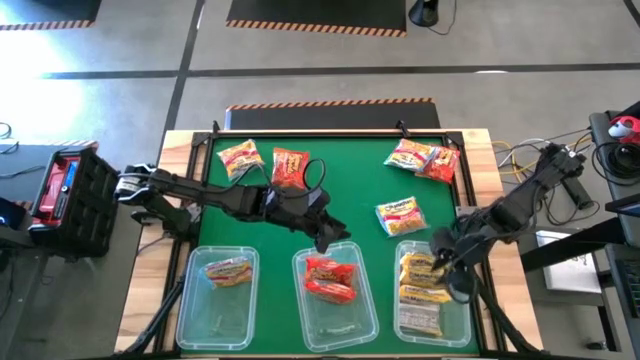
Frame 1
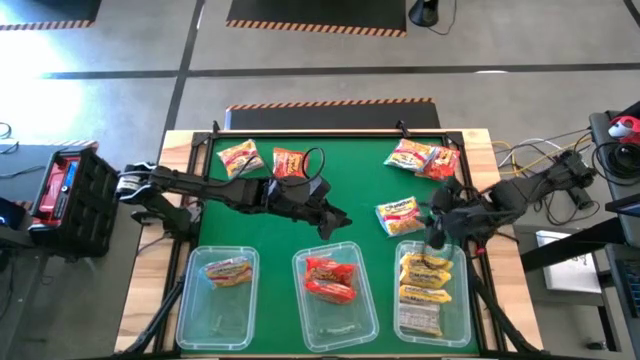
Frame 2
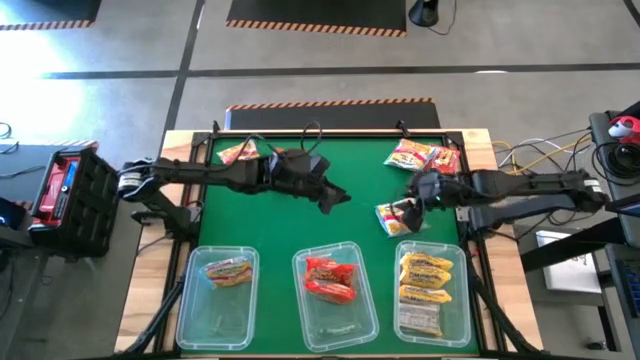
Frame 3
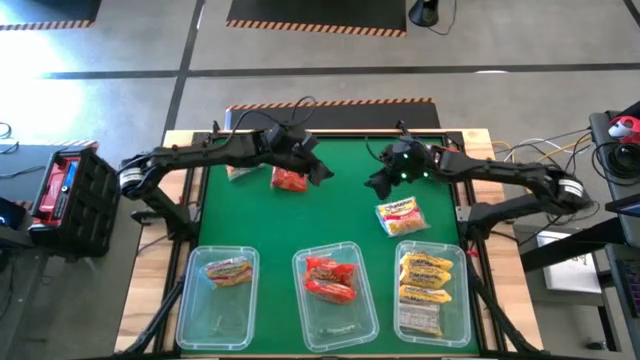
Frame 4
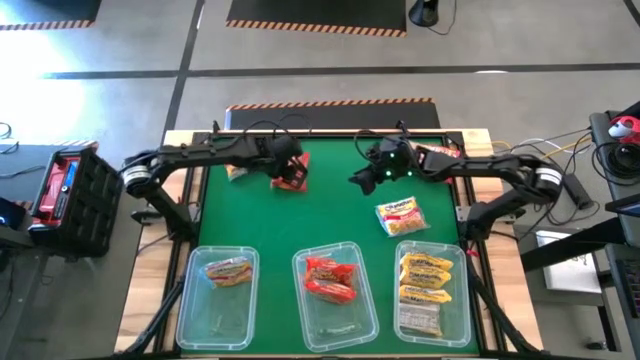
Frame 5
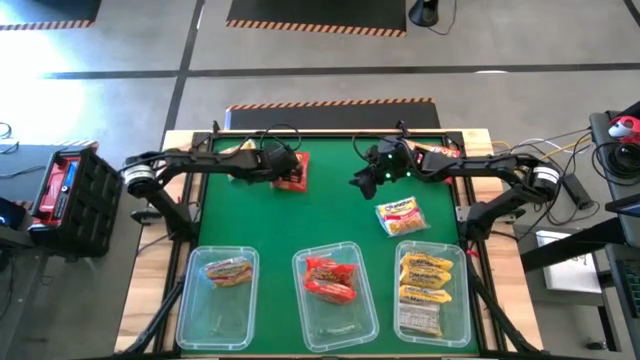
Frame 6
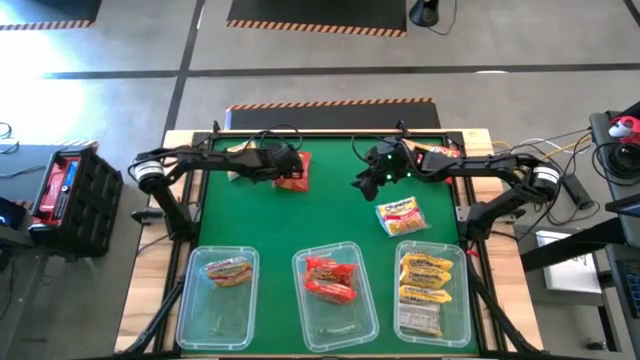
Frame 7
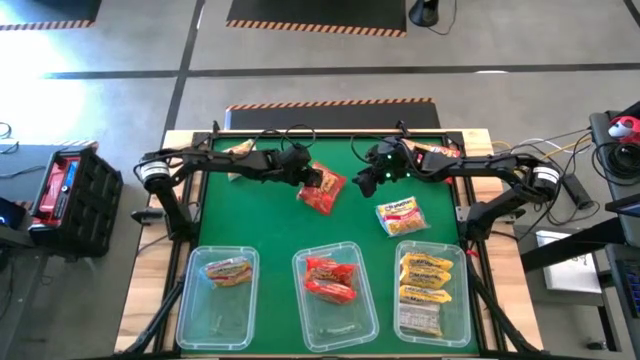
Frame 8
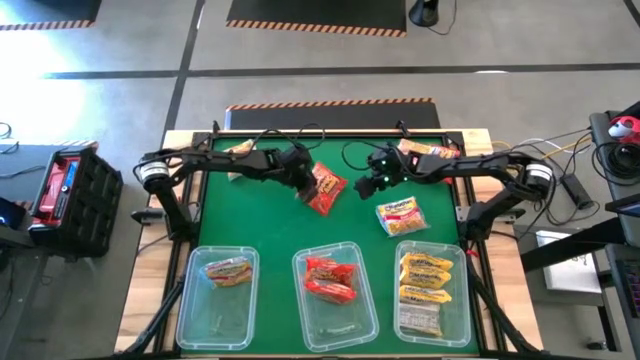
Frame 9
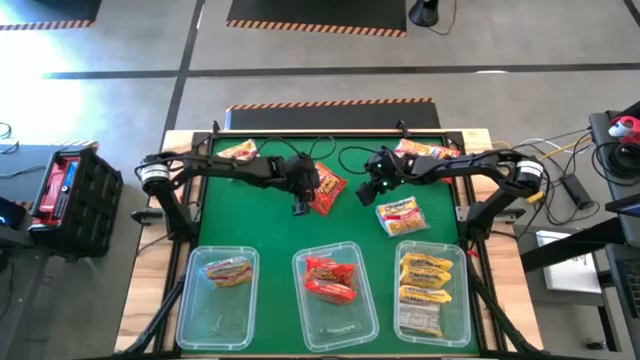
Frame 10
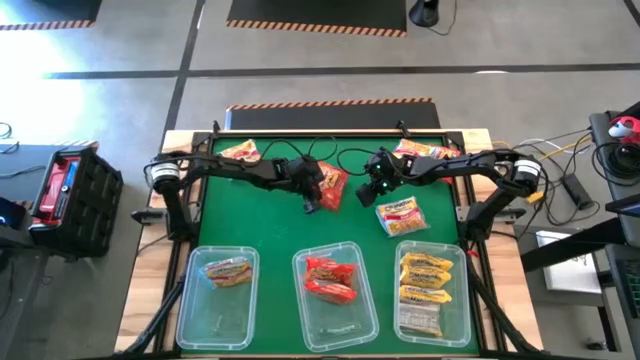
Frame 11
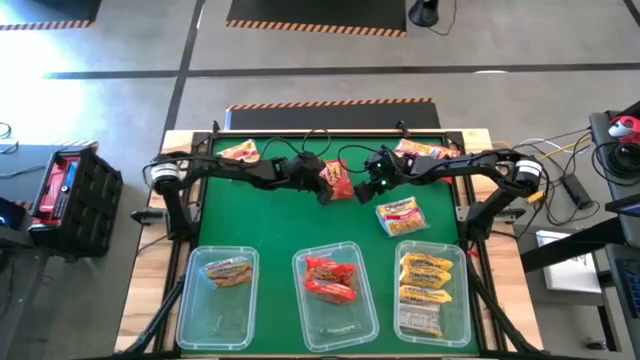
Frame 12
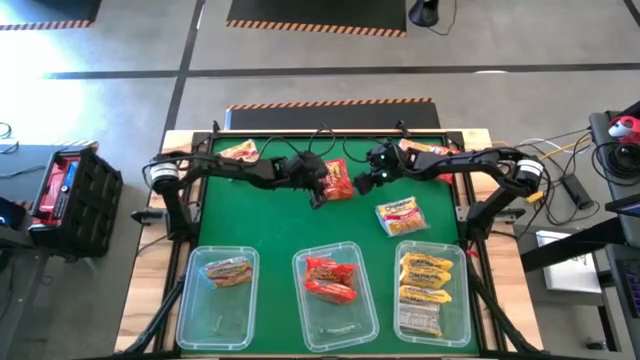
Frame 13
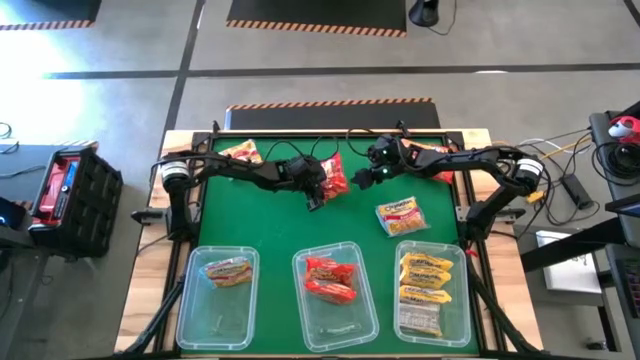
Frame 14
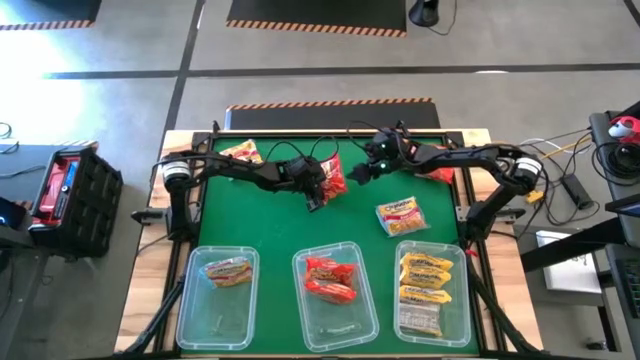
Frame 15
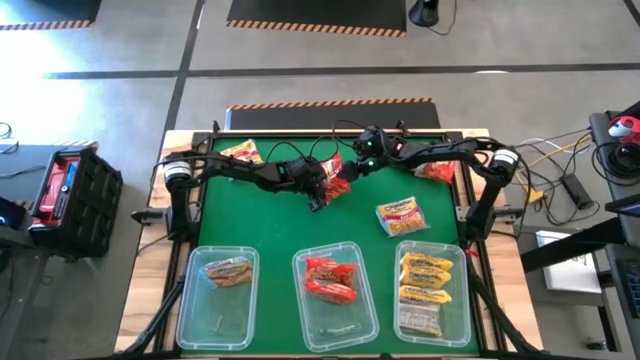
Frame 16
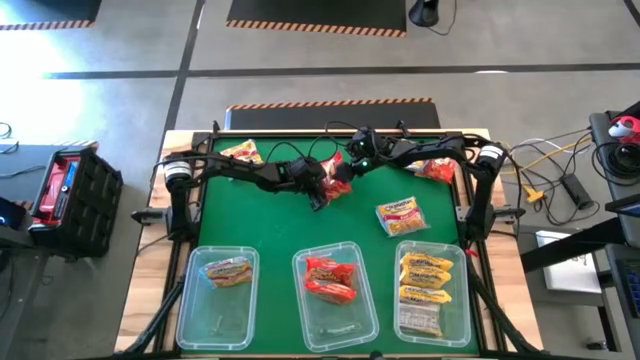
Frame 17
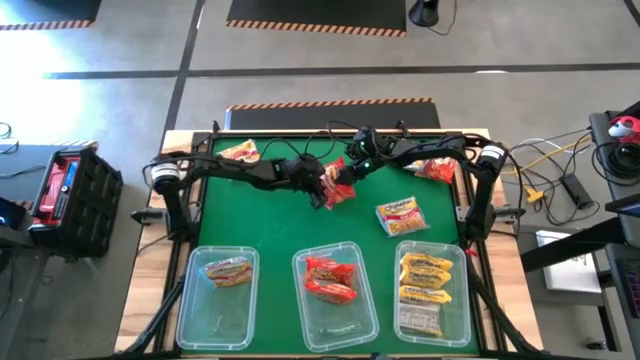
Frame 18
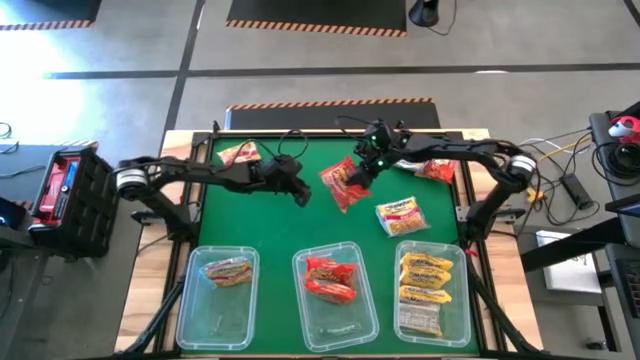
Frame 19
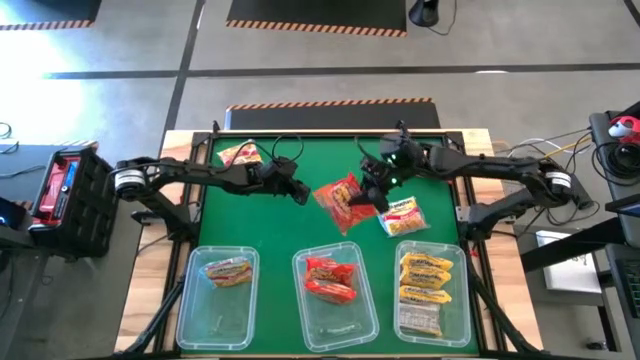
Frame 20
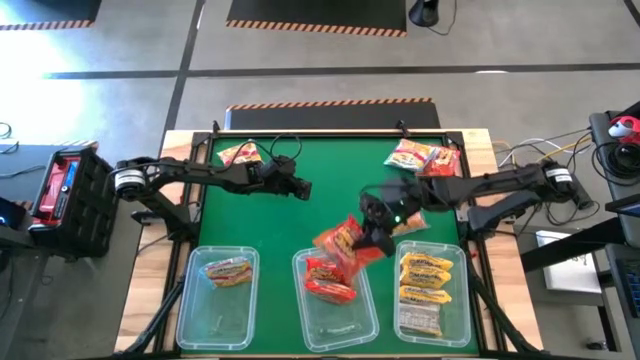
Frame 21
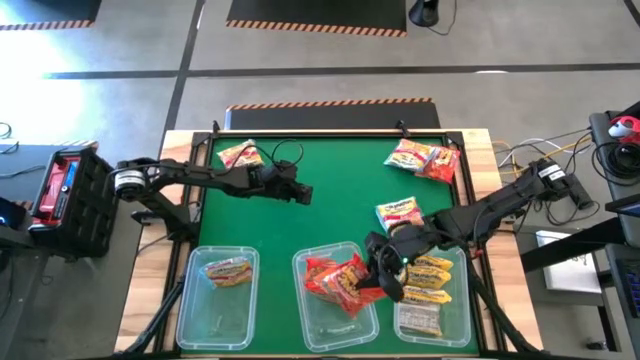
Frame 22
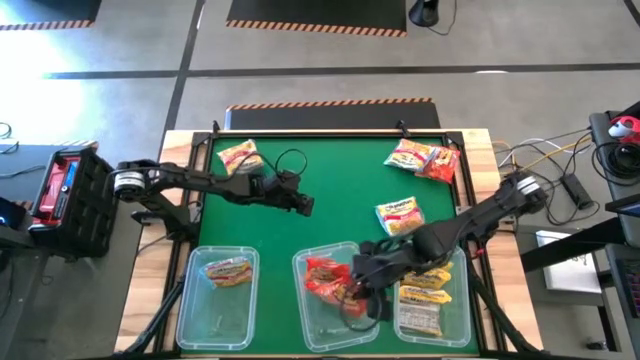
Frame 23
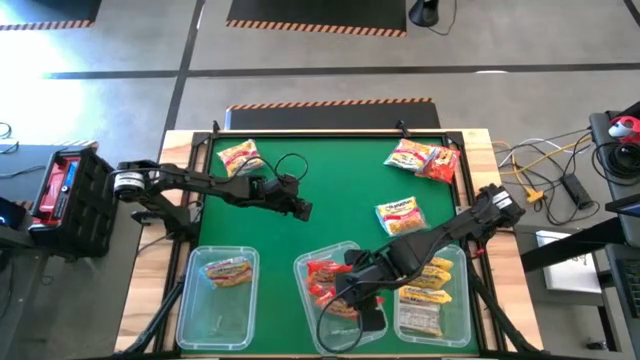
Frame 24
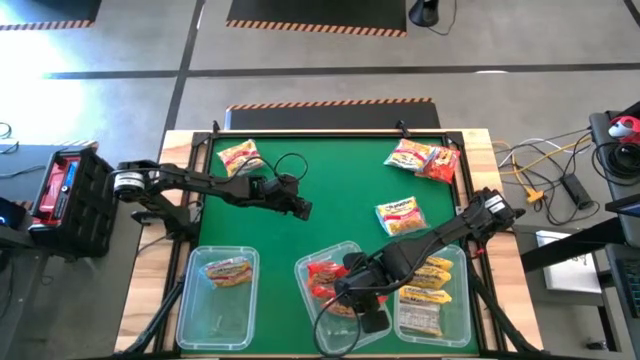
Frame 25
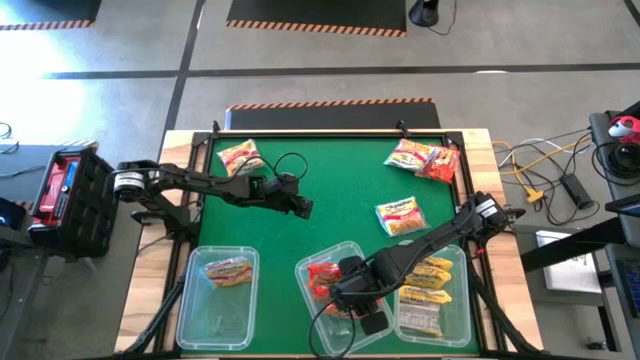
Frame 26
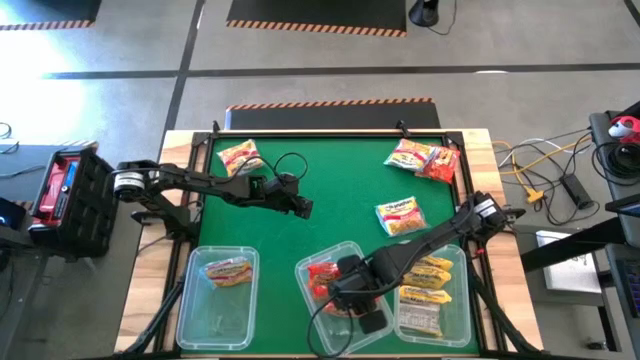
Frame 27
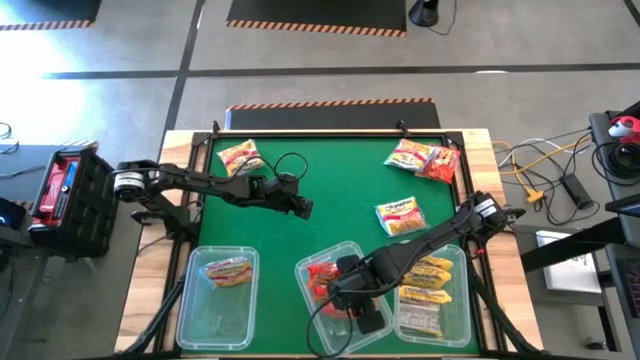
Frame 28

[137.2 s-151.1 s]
Task: Sort Maruchan noodles
Put the orange noodle pack into the middle transparent bin

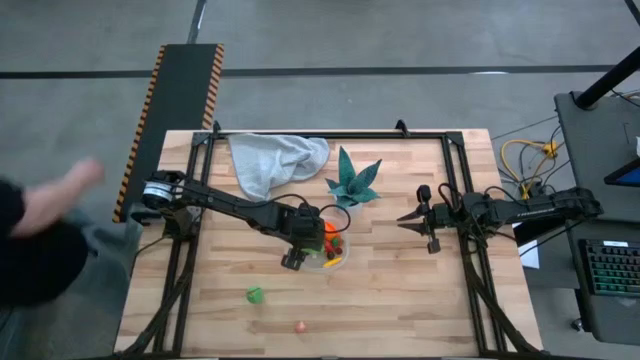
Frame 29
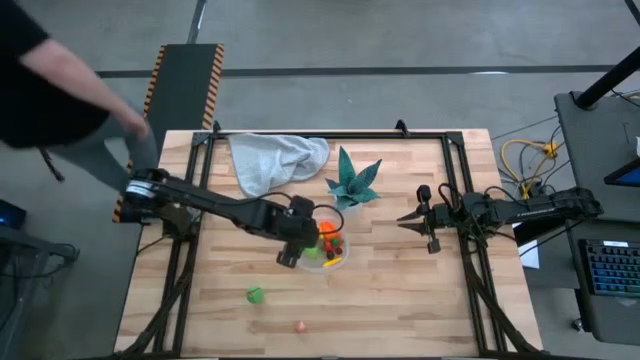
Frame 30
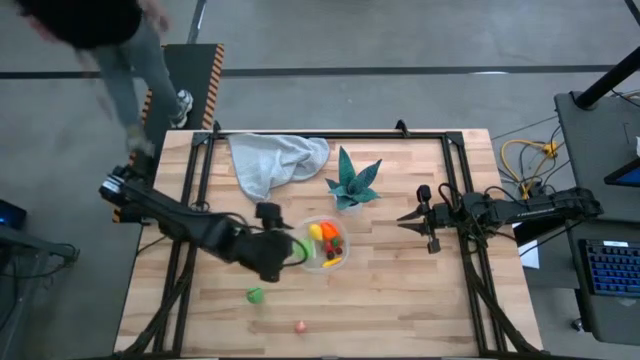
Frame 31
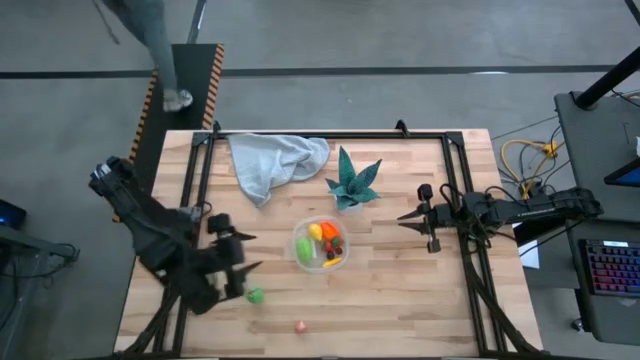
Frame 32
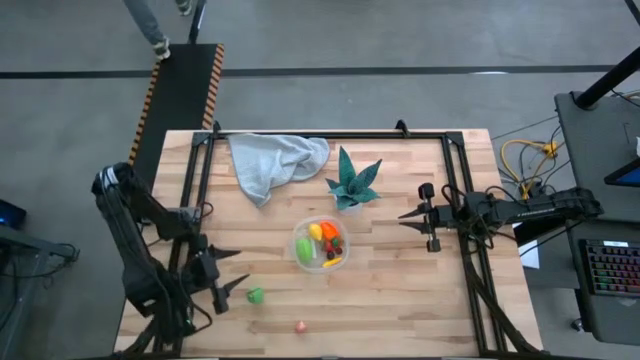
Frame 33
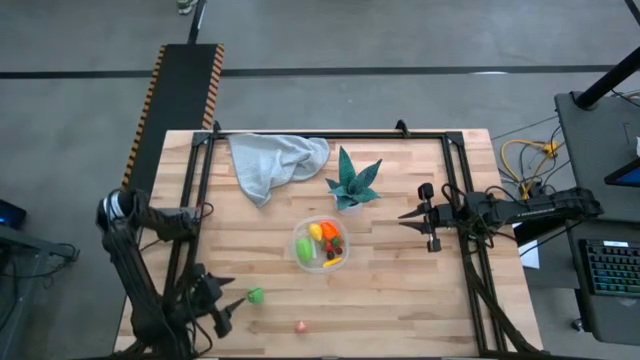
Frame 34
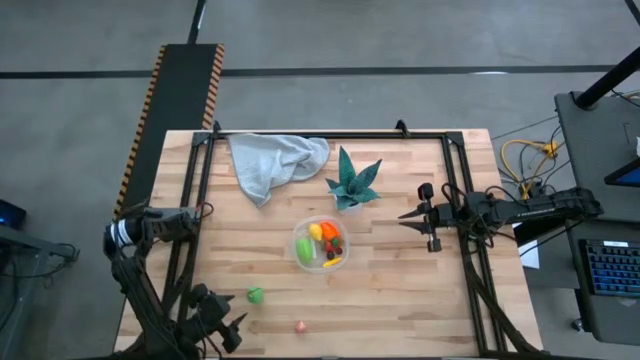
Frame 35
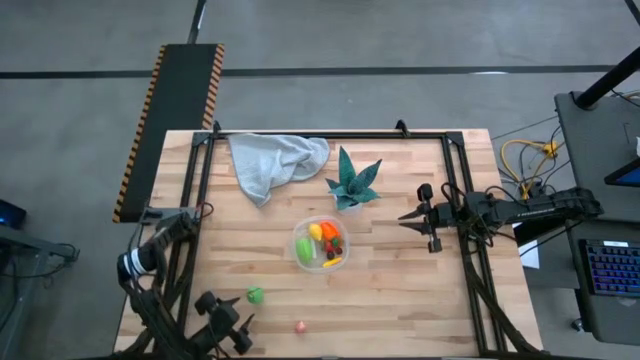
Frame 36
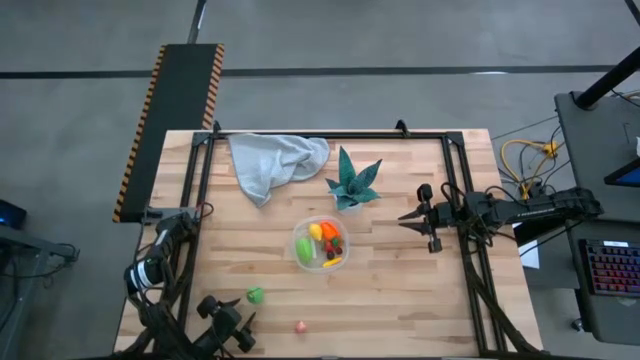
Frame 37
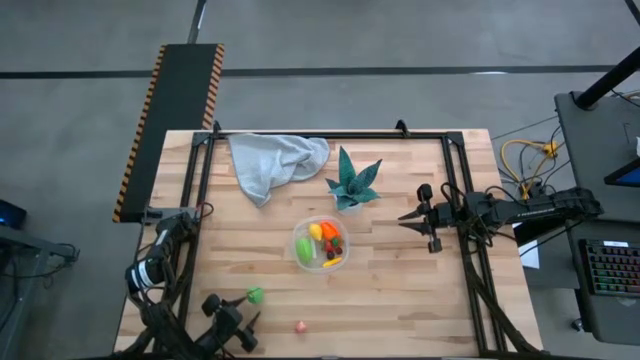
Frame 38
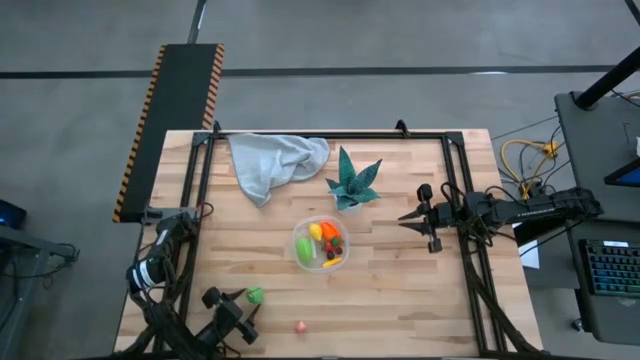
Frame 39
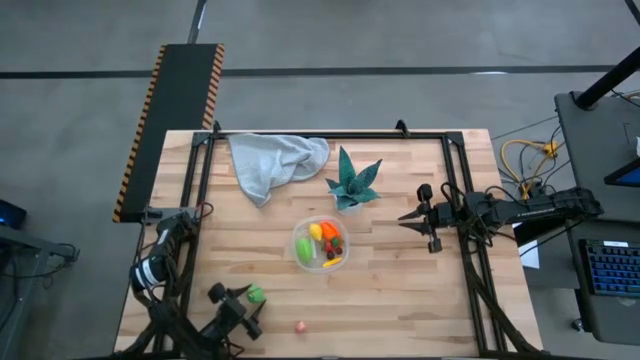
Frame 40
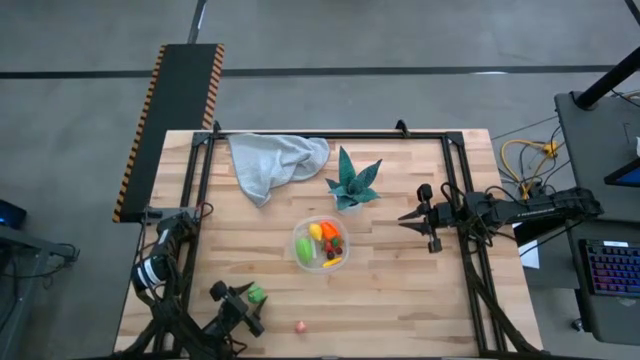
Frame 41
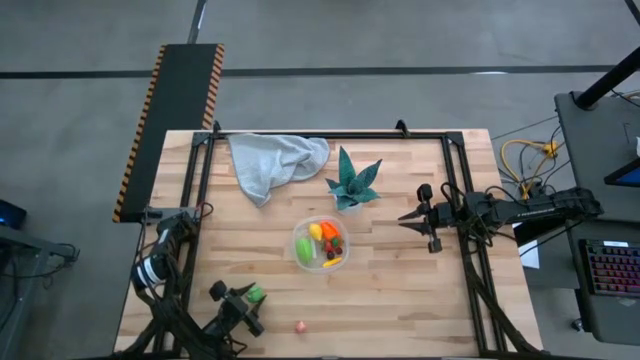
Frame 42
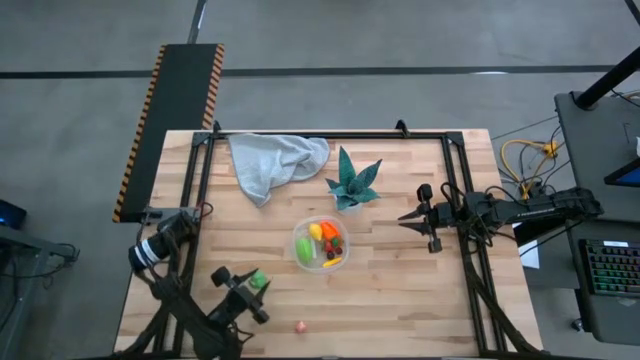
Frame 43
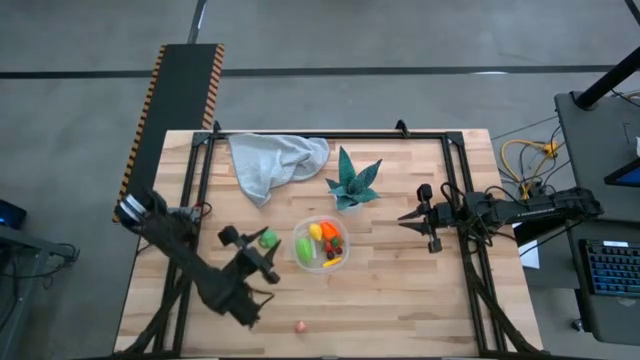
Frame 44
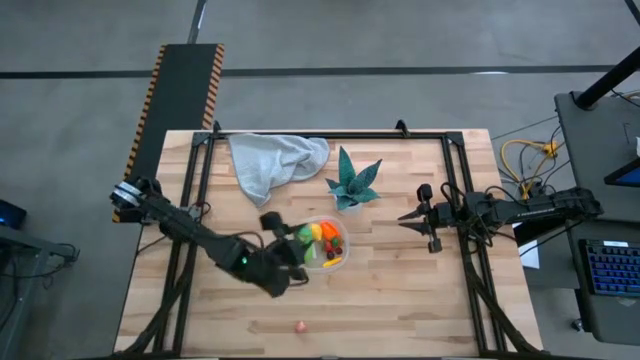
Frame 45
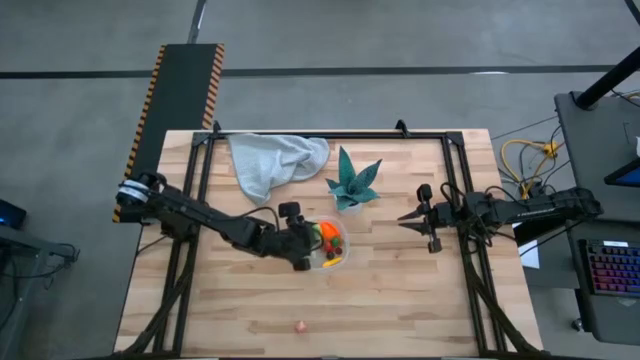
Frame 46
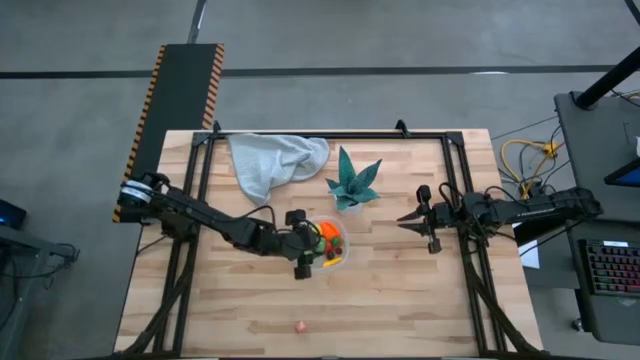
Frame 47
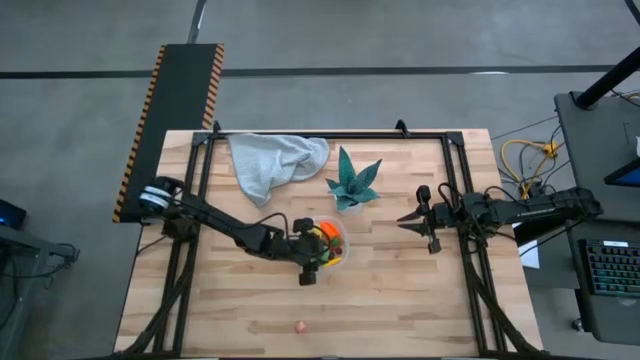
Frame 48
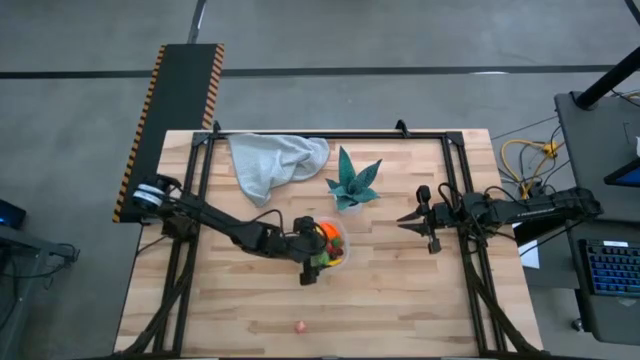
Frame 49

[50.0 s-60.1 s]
Task: Pick and placing Produce into tupperware
Put the green corn into the transparent bin
